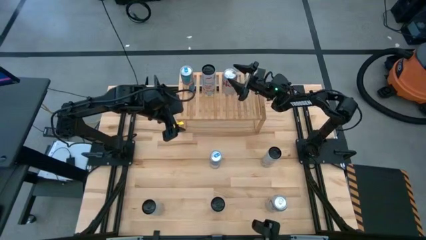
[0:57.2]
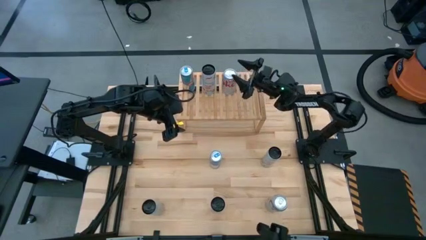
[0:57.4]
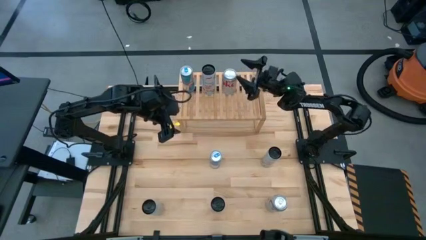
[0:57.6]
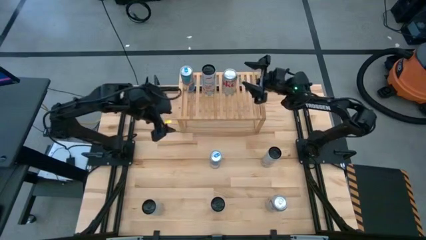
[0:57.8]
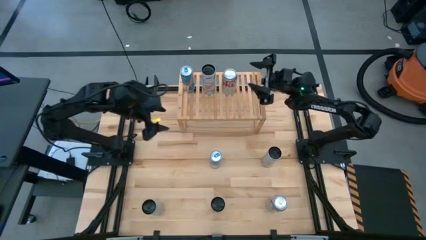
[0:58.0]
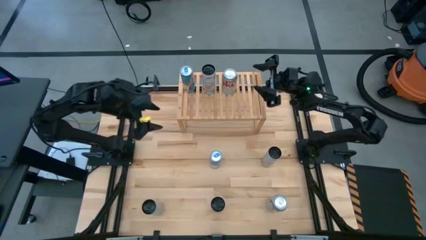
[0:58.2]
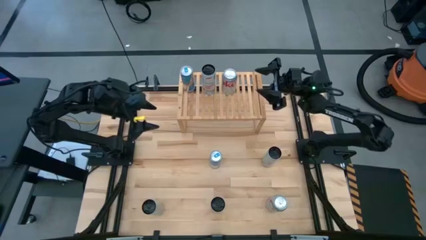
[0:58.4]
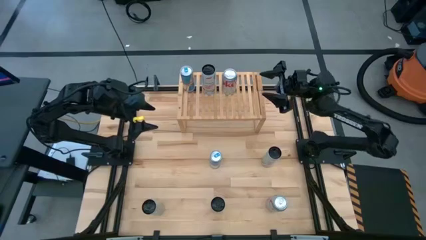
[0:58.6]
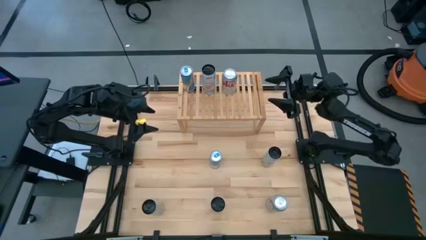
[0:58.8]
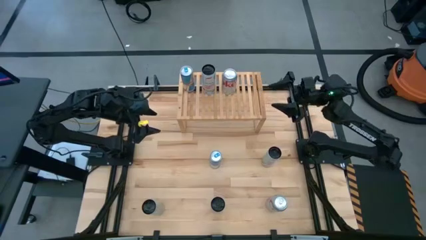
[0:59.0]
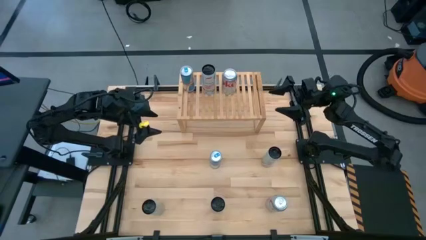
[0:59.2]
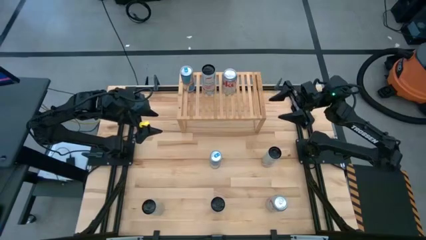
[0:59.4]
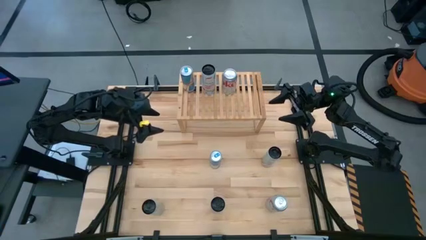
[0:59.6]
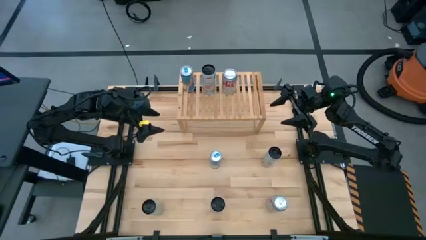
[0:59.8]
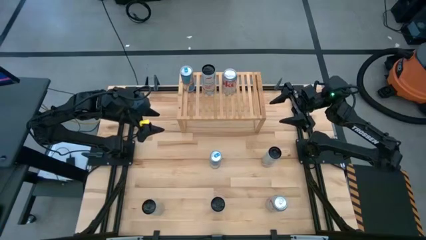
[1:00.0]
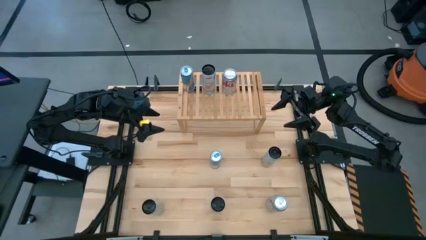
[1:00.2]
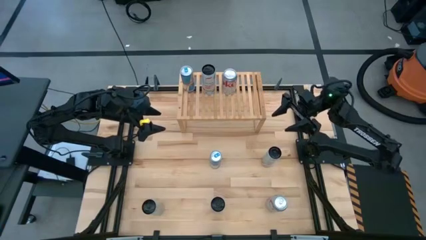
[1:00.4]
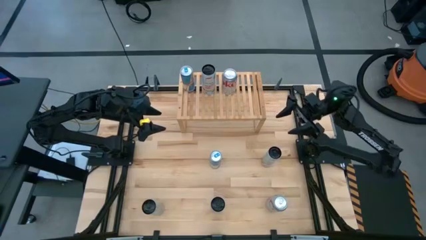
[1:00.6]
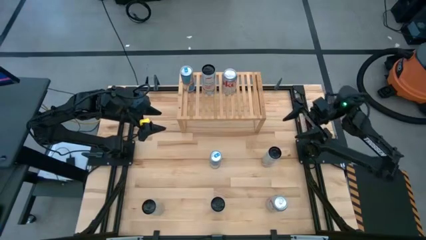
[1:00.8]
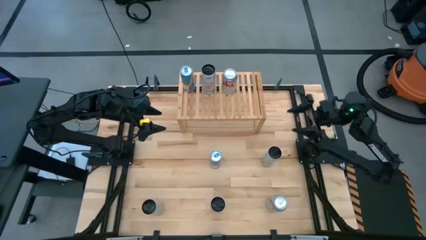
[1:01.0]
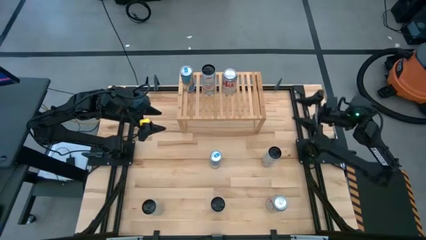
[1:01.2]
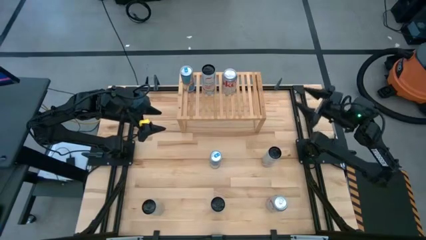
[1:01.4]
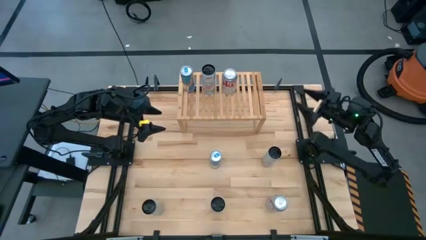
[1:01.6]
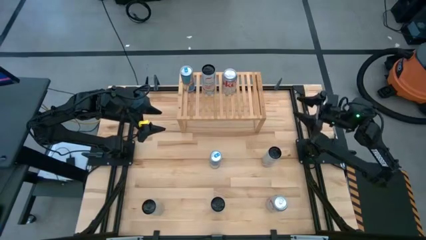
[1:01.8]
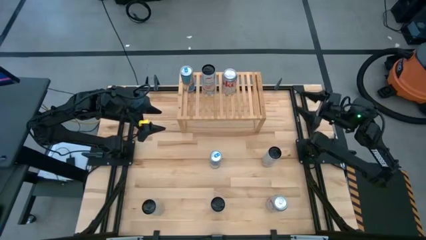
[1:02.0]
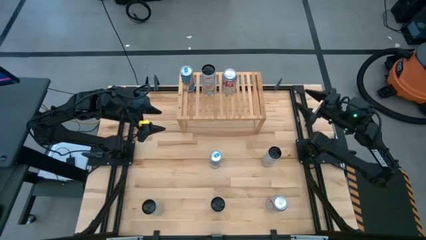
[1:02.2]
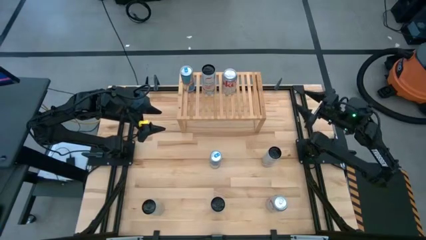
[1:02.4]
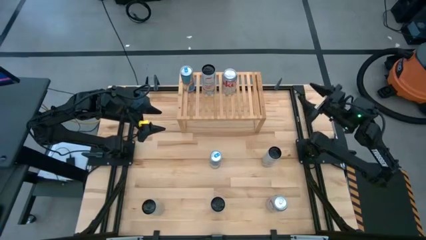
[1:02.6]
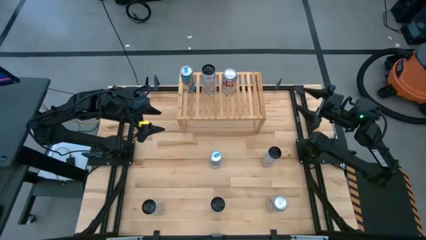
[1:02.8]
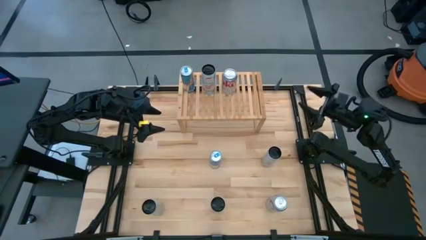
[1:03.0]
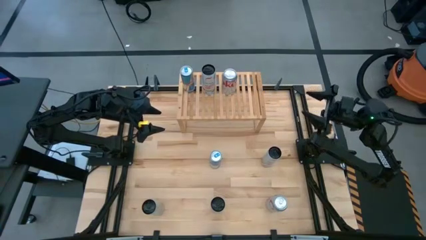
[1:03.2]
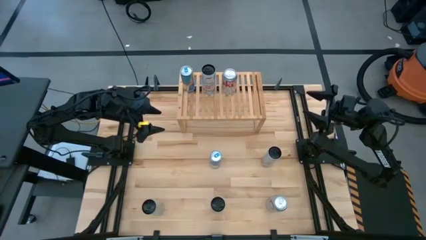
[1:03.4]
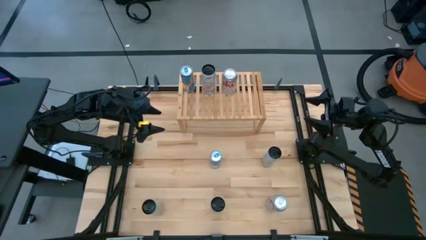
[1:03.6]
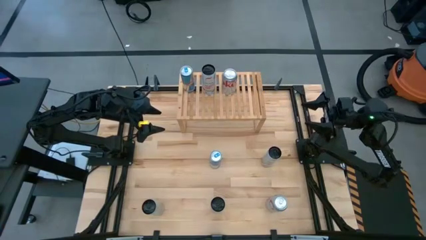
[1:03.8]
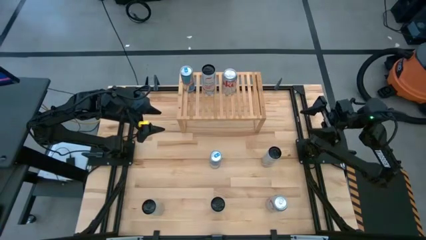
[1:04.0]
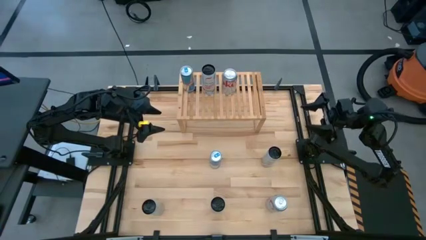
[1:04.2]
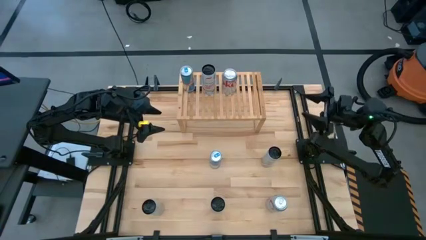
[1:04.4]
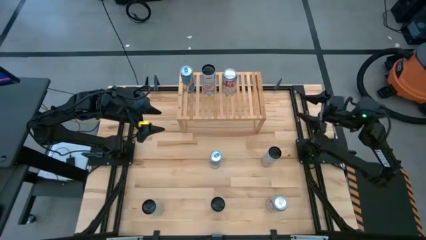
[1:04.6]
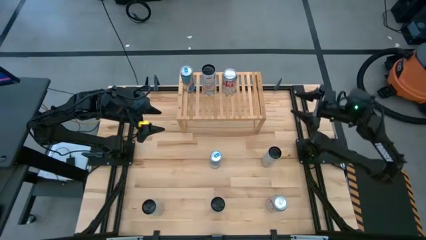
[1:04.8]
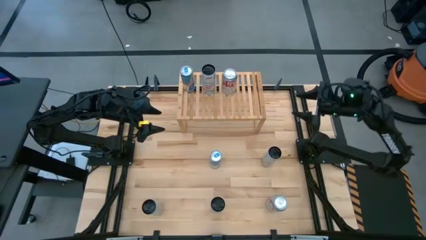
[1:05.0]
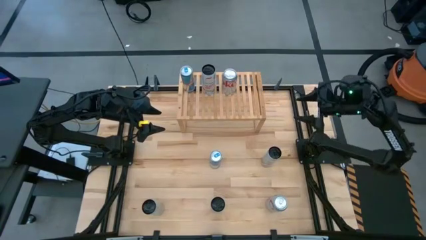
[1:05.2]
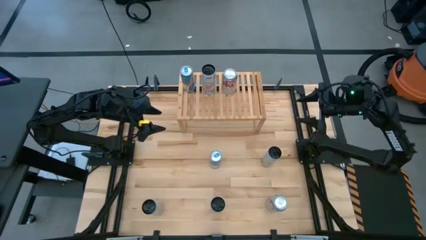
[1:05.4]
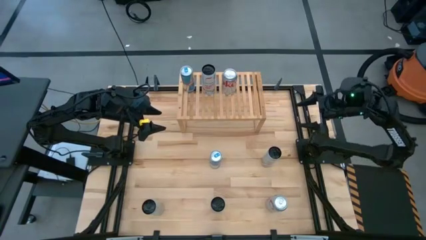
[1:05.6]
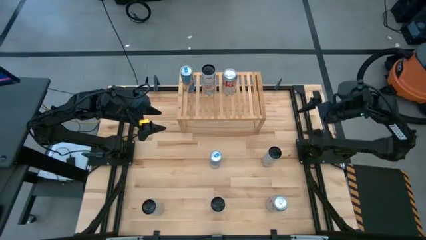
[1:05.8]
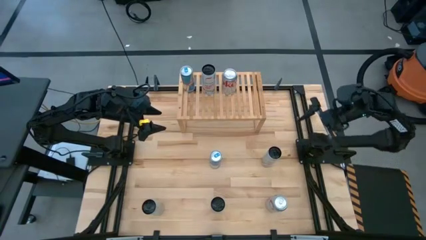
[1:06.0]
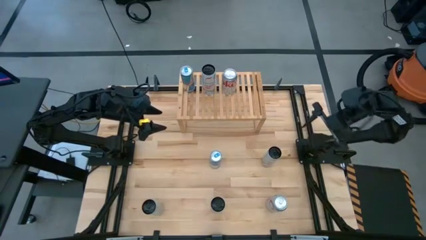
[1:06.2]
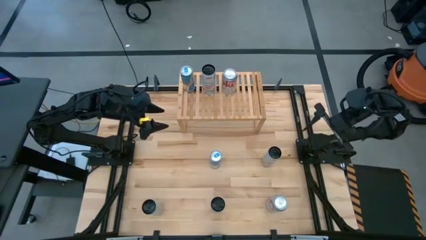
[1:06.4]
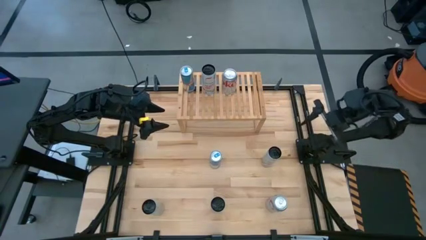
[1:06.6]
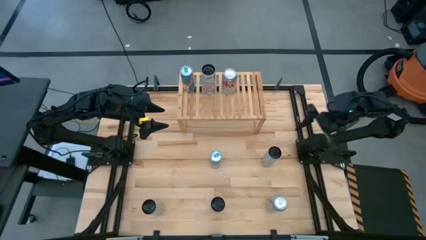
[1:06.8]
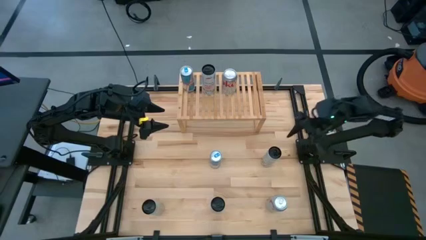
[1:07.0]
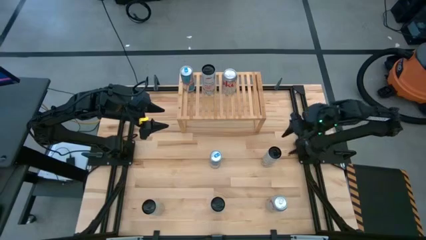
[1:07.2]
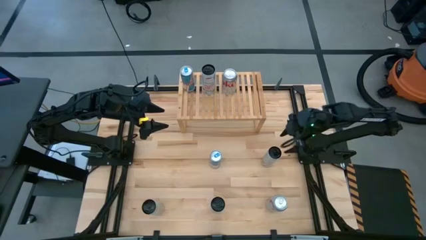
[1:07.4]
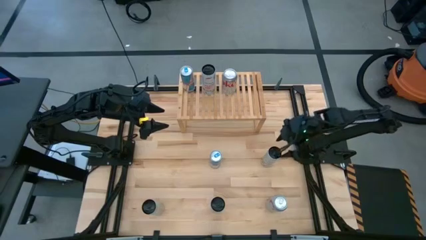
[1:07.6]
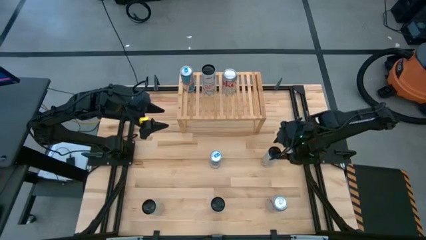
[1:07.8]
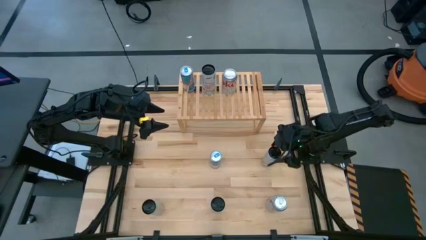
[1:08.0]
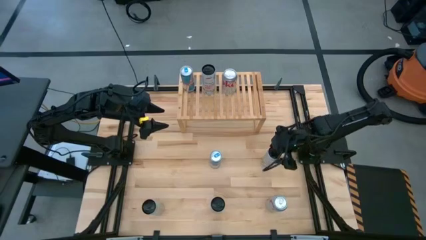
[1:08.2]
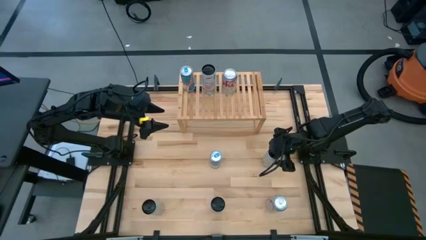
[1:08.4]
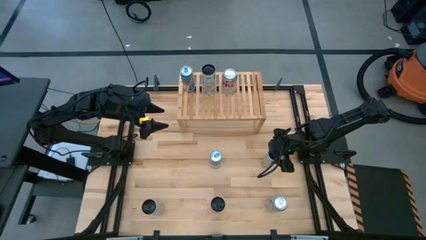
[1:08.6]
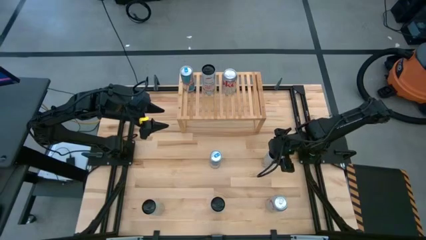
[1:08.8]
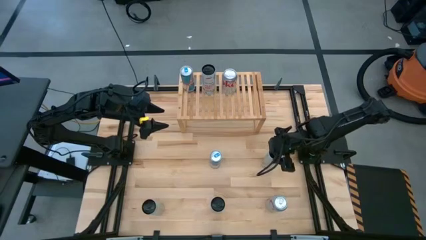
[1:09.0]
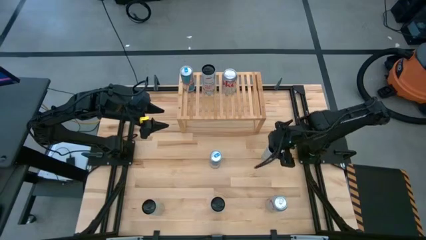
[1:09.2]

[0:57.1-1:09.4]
Task: Place canned beverage on shelf
Put the top white and yellow soda can on the shelf

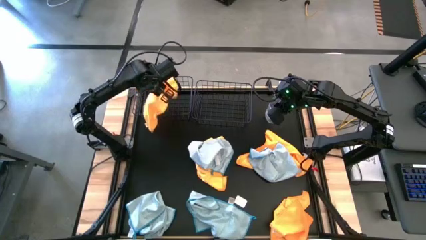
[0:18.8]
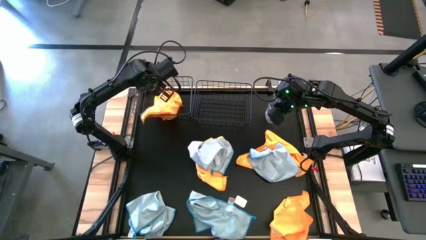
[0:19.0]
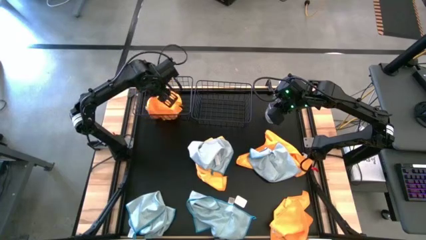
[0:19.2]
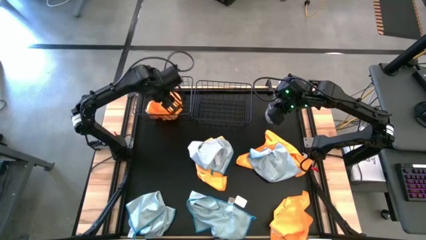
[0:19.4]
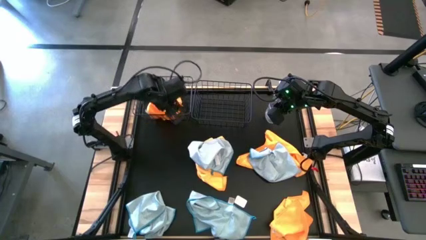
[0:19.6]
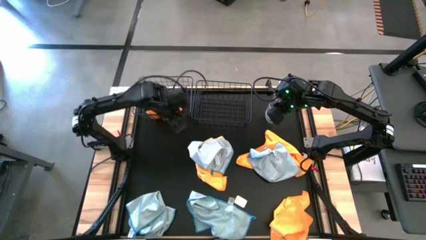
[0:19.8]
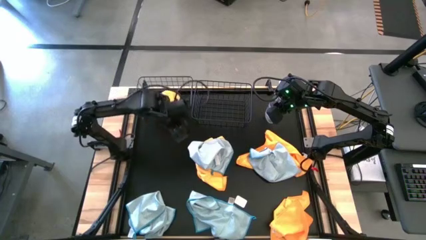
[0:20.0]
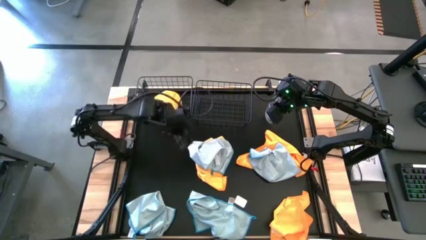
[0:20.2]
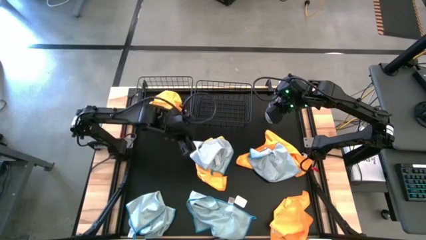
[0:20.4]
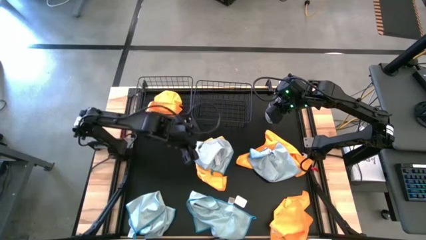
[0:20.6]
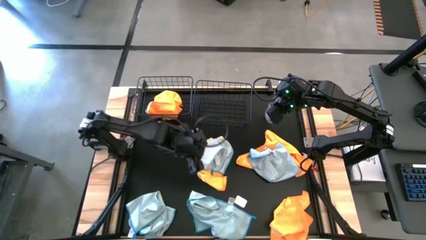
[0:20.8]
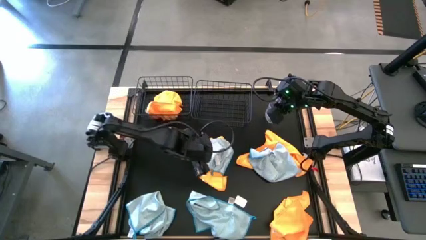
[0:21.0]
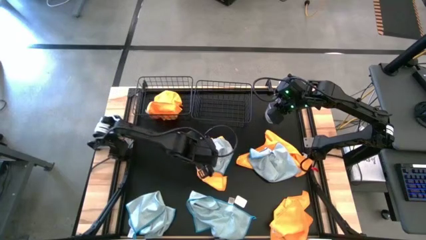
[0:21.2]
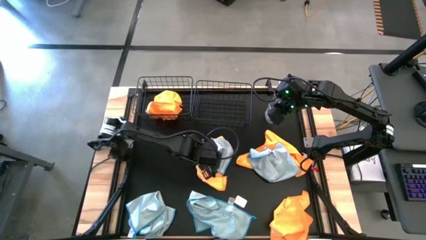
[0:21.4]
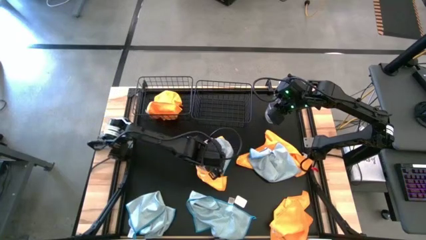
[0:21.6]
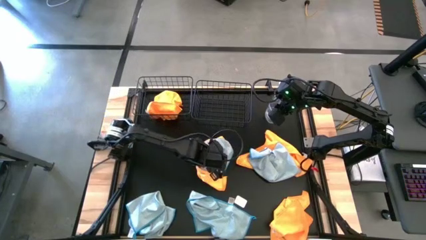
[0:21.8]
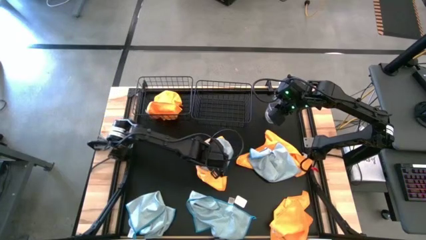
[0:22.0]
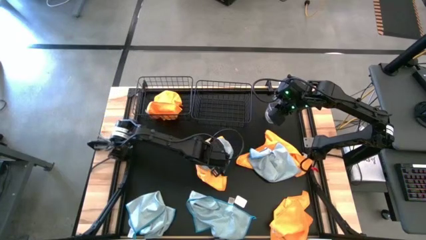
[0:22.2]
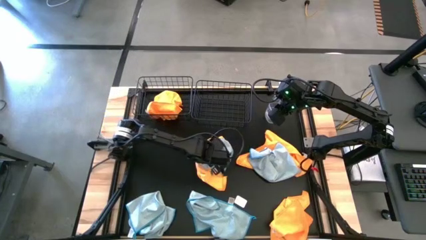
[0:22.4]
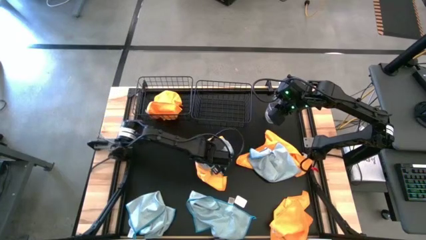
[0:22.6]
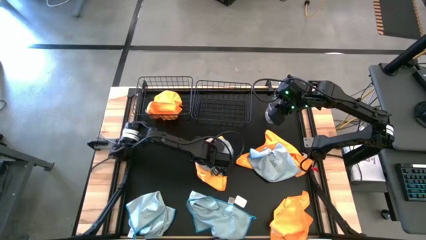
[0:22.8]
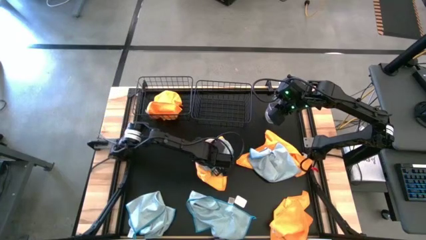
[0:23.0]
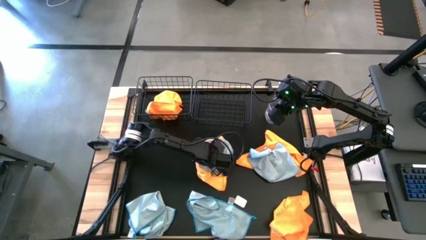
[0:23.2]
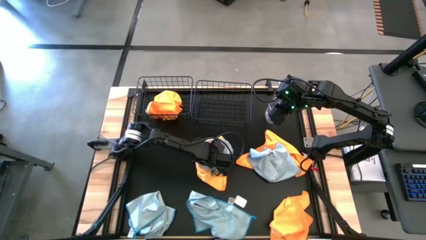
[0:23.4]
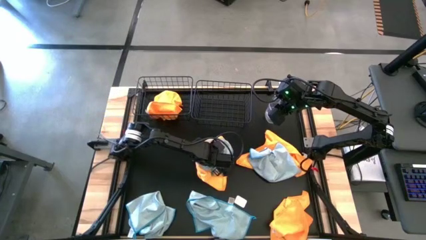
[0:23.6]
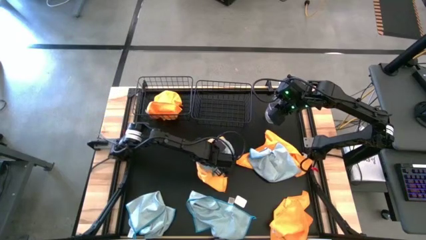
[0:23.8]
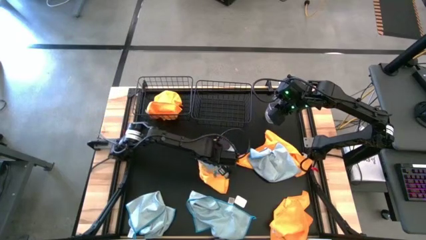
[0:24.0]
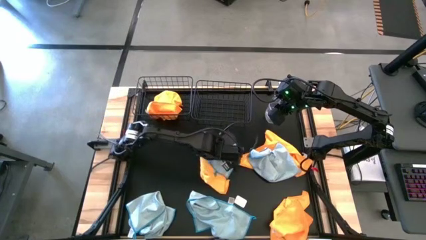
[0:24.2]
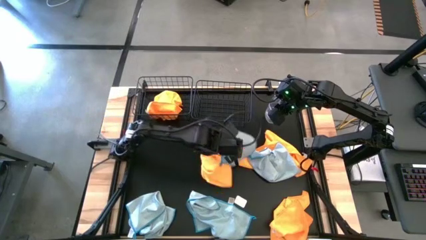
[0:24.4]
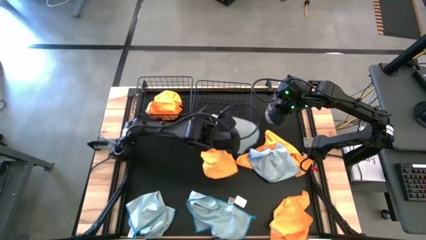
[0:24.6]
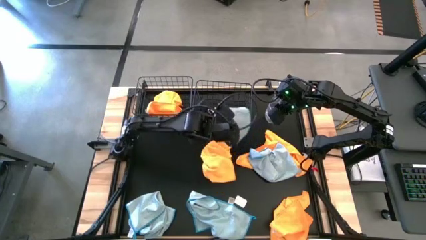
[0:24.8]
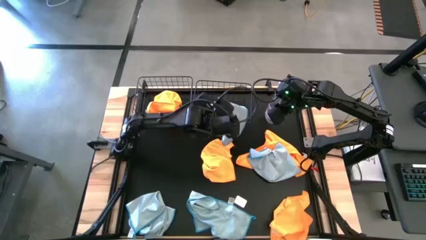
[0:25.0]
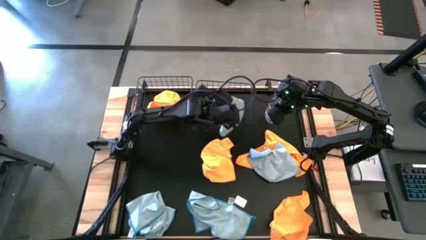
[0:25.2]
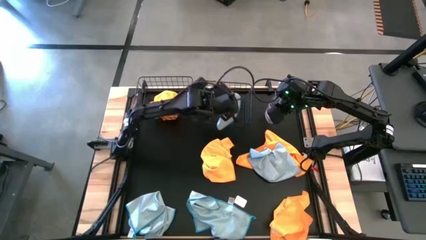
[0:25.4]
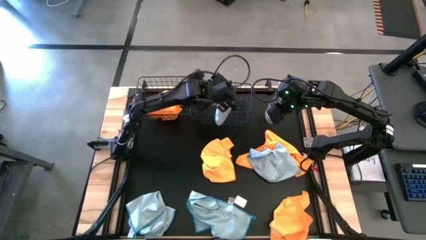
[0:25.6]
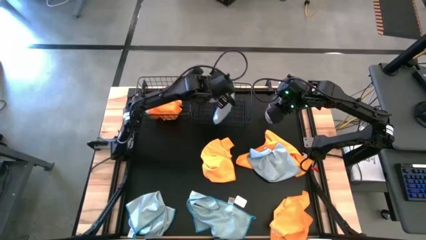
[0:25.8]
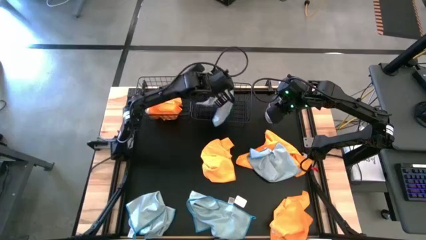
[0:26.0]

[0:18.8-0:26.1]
Task: Sort microfiber towel by color & place in baskets
Put the blue microfiber cloth into the right black wire basket
